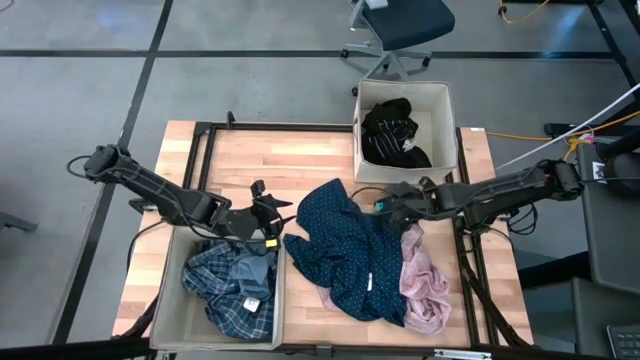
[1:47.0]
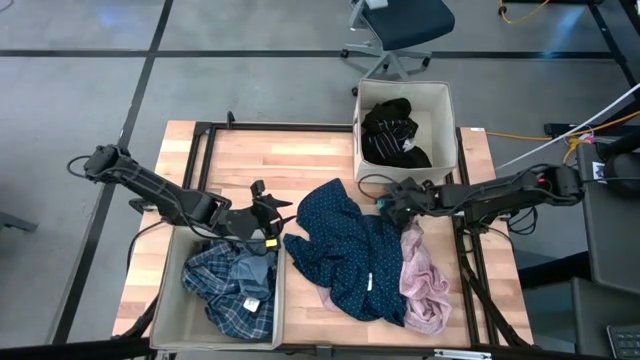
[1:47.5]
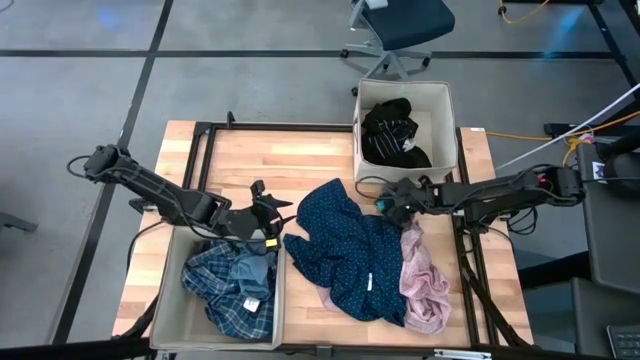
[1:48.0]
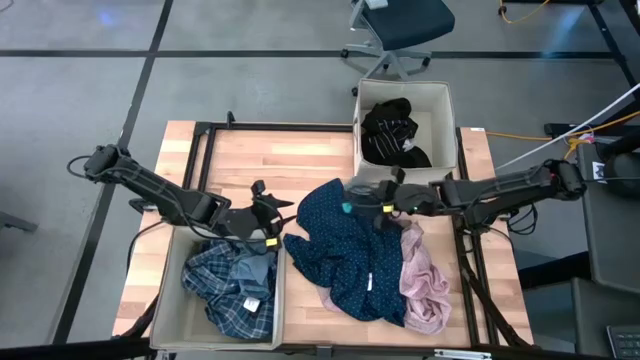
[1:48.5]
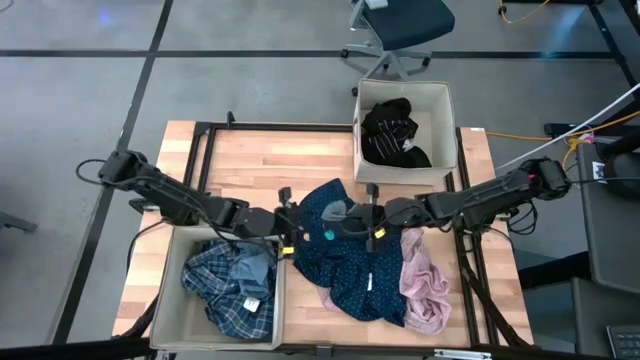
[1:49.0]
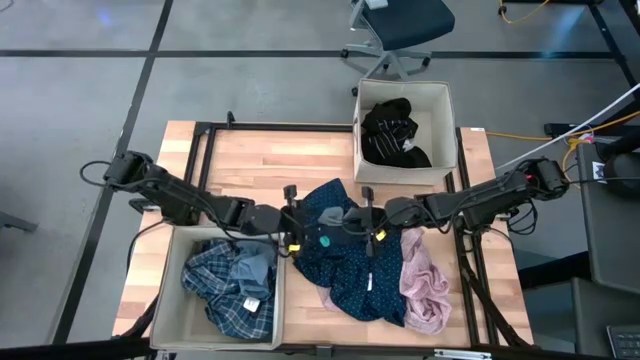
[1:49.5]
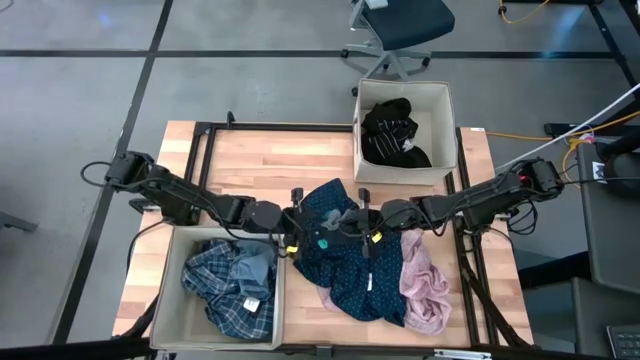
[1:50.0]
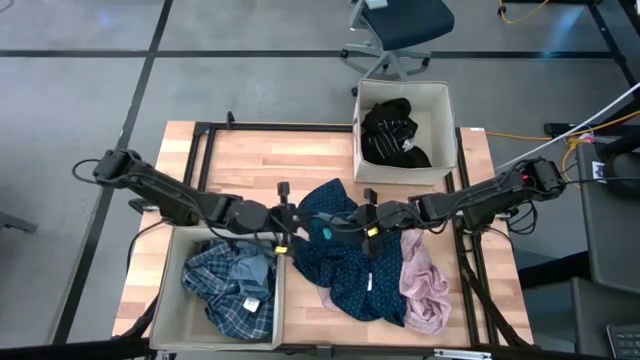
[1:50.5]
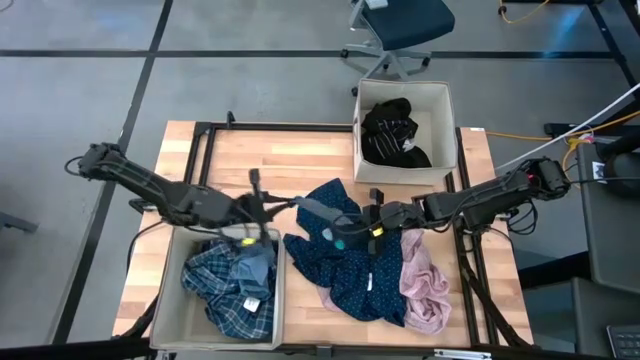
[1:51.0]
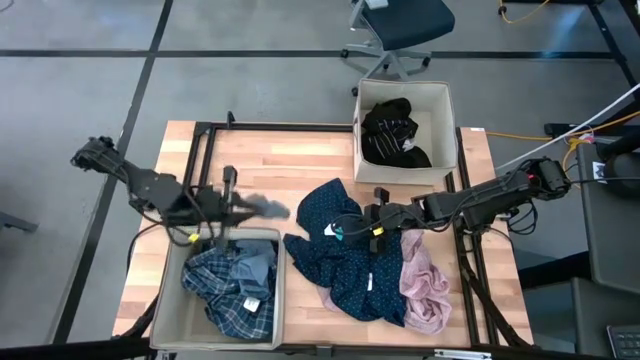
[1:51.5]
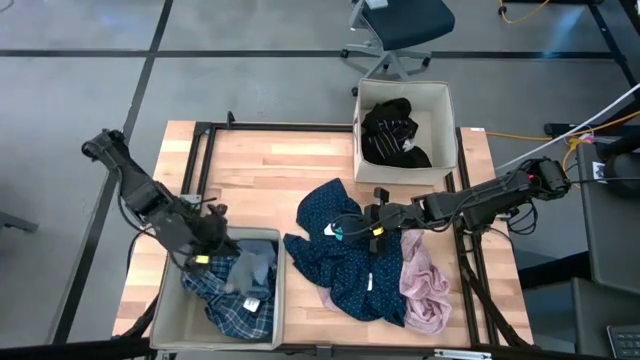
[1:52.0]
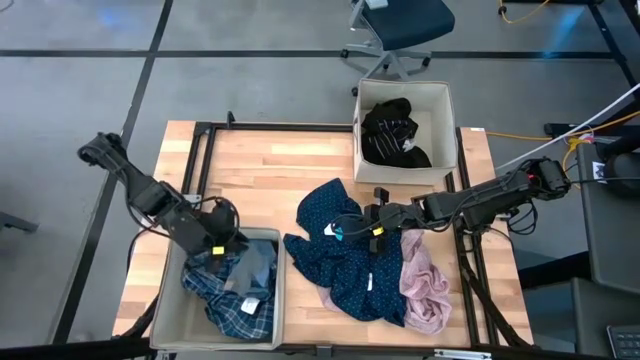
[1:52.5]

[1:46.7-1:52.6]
Task: Sort clothes
Put the gray sock into the bottom laundry organizer

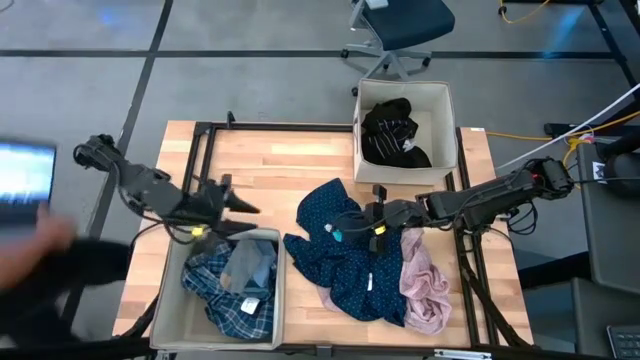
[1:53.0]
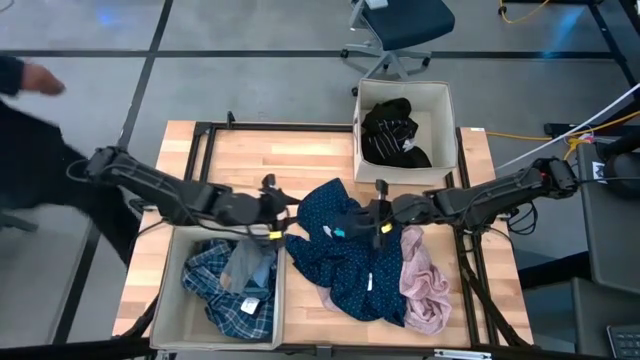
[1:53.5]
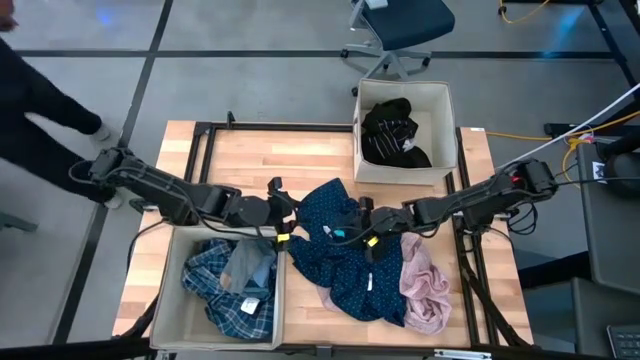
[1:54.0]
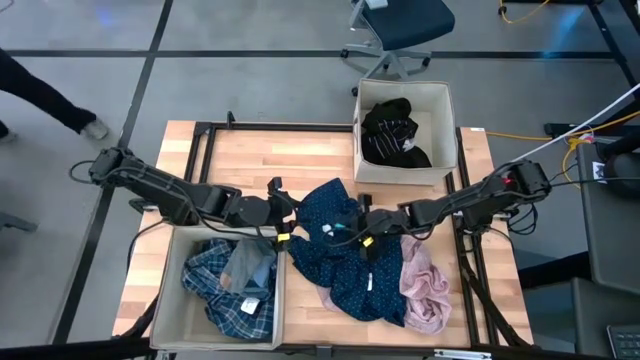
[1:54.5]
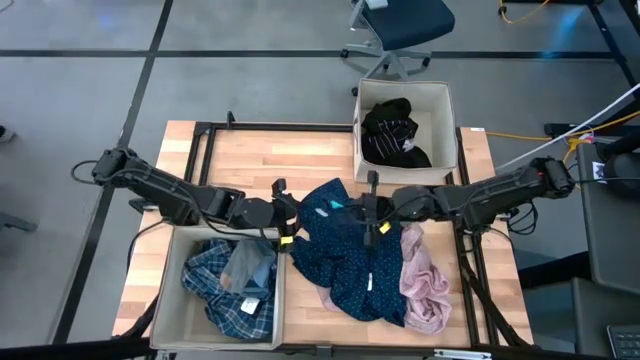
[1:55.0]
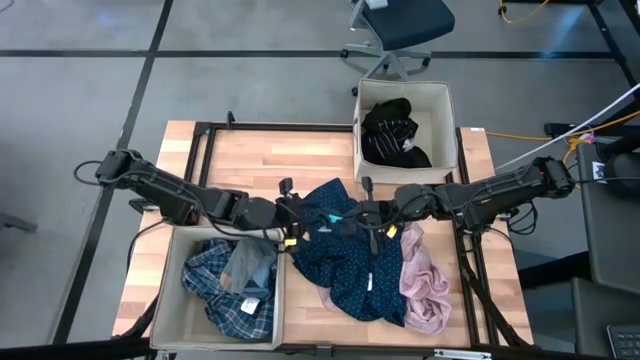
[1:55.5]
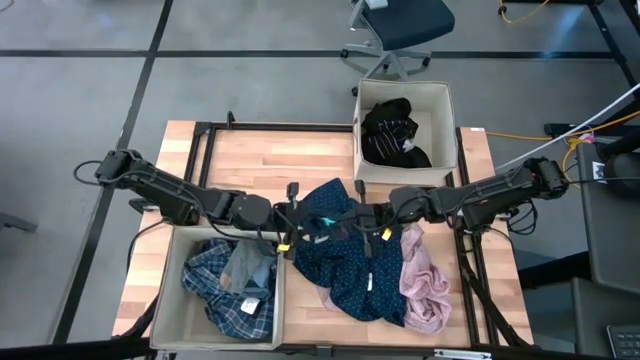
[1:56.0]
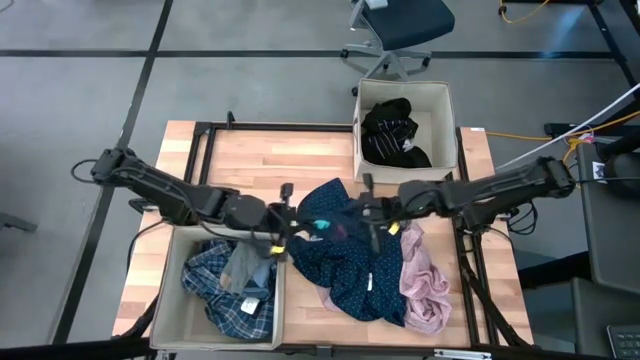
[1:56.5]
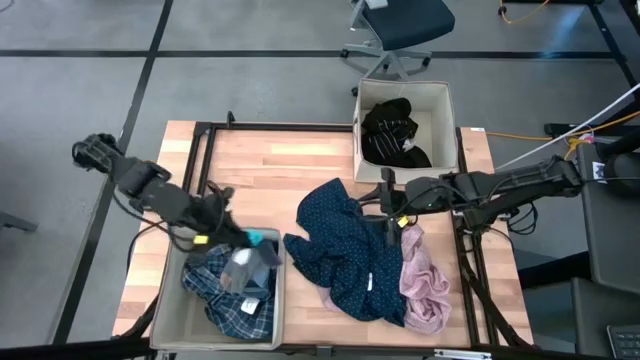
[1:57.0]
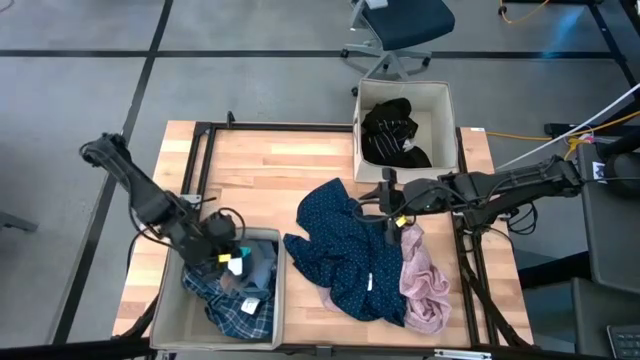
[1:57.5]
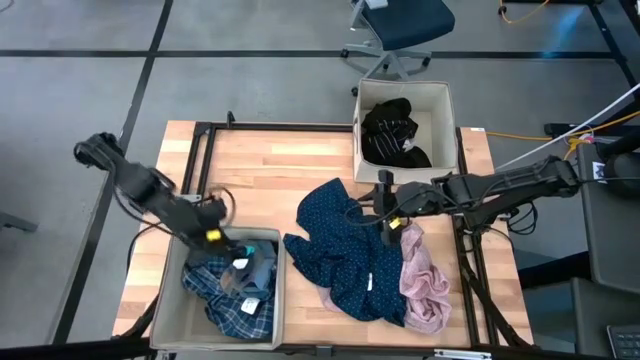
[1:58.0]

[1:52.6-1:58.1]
Put the blue sock into the bottom laundry organizer

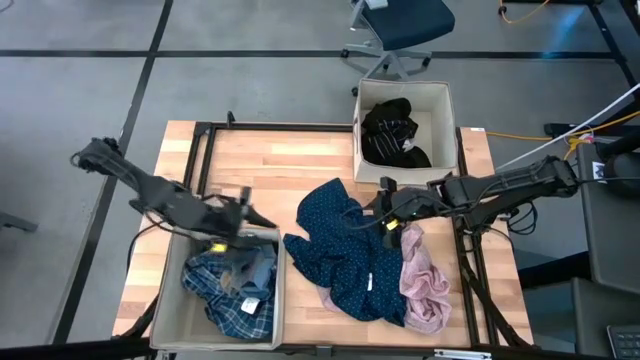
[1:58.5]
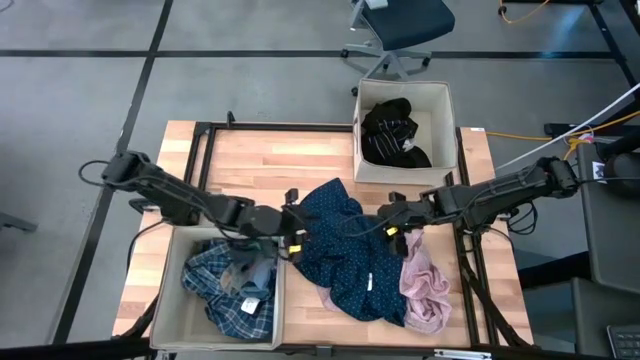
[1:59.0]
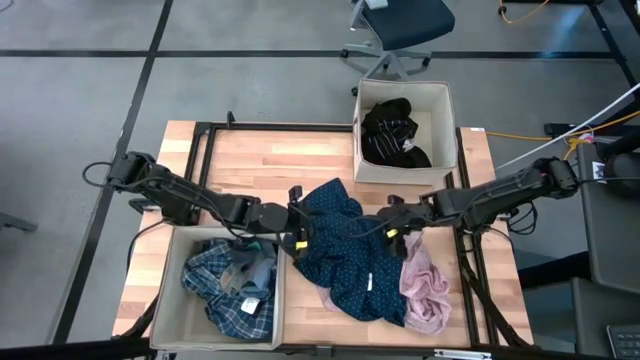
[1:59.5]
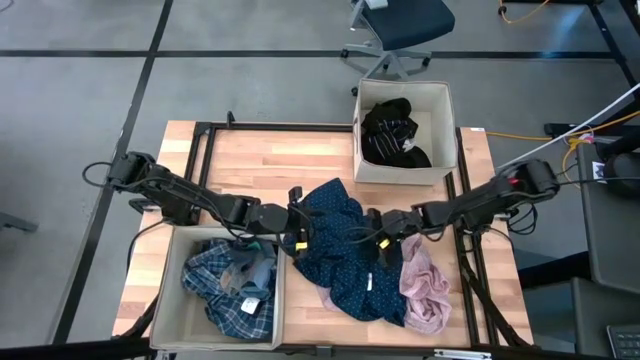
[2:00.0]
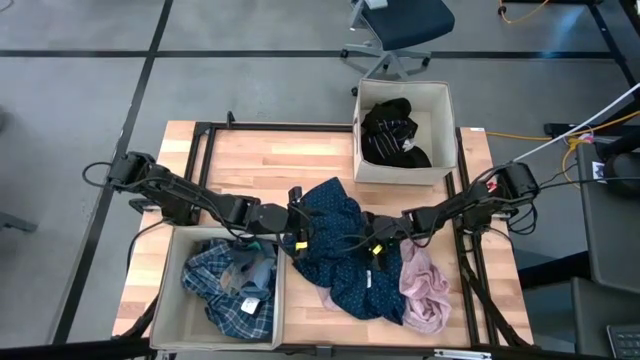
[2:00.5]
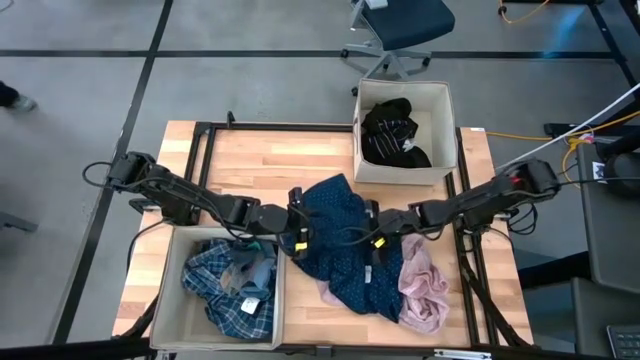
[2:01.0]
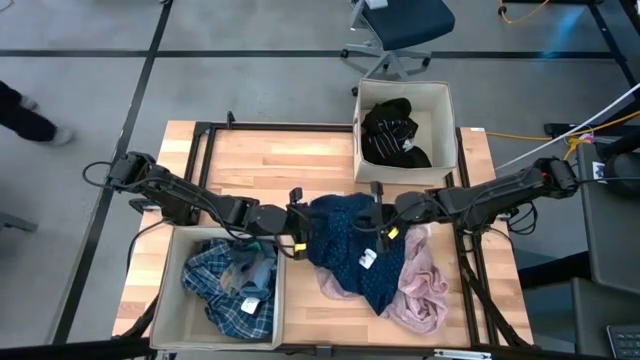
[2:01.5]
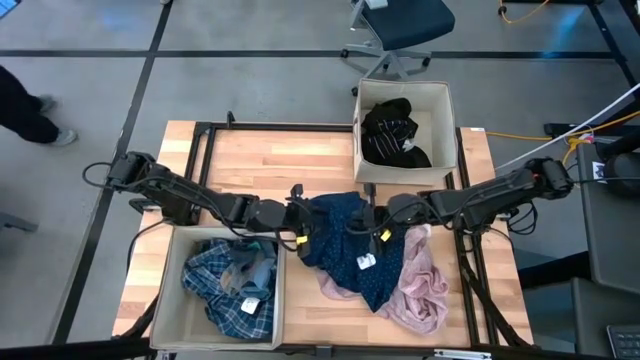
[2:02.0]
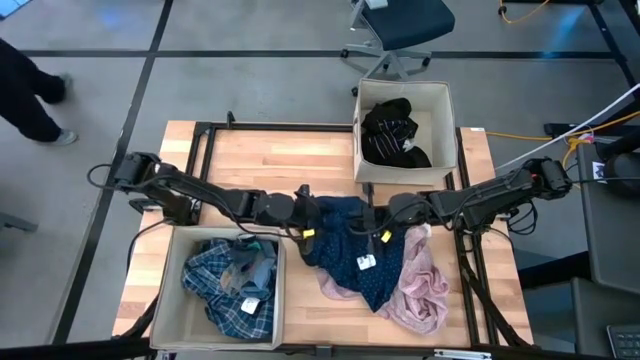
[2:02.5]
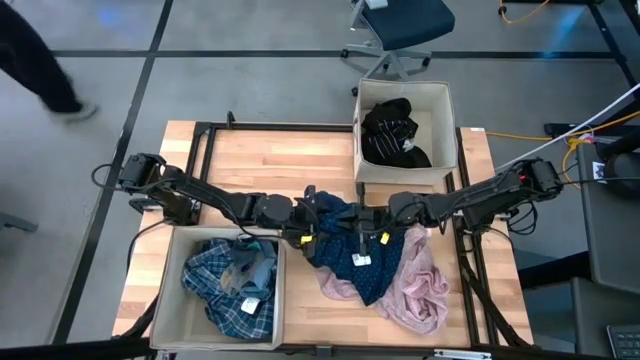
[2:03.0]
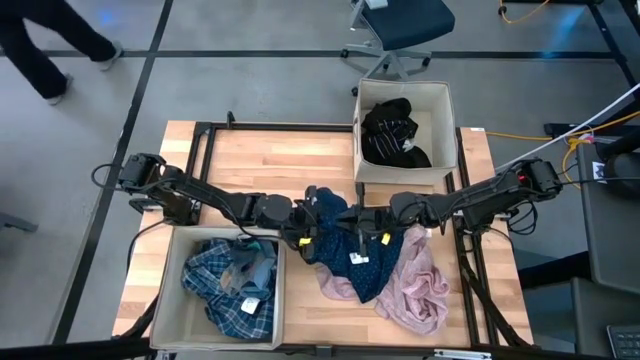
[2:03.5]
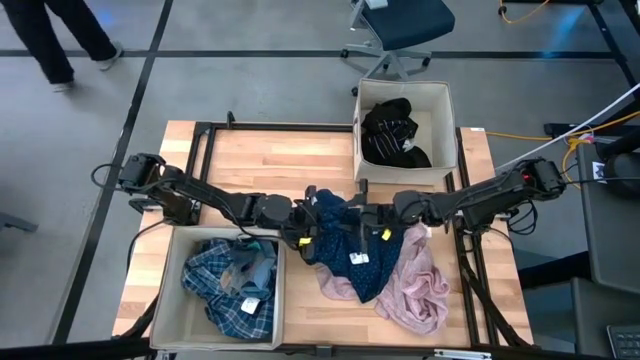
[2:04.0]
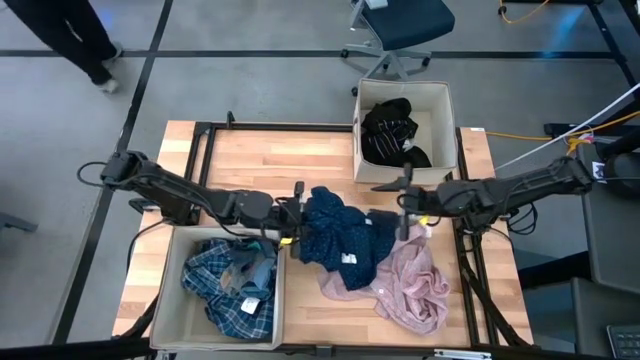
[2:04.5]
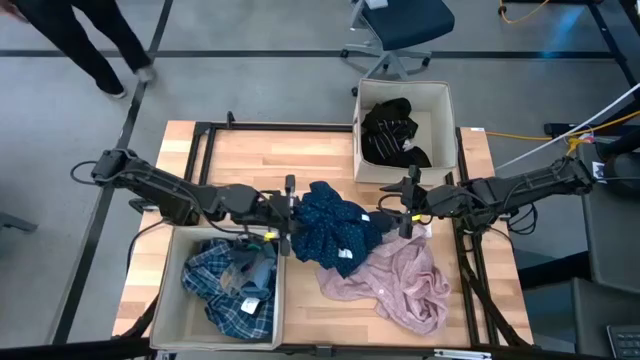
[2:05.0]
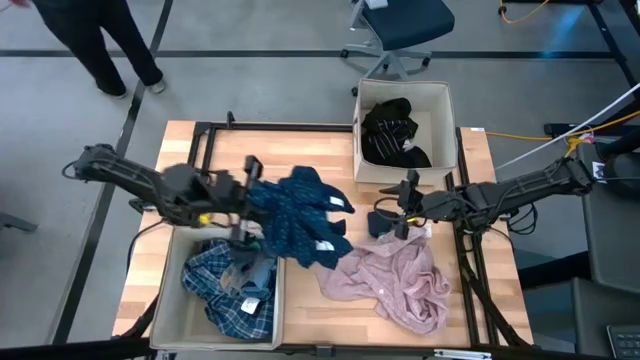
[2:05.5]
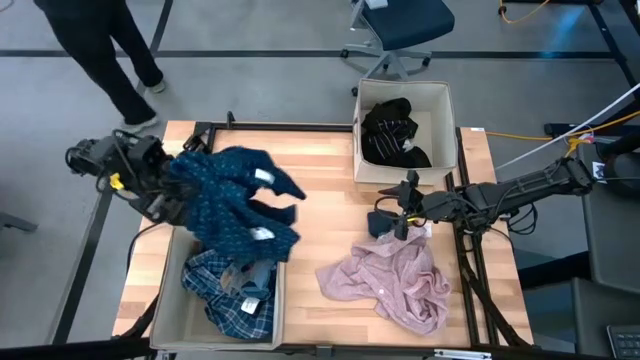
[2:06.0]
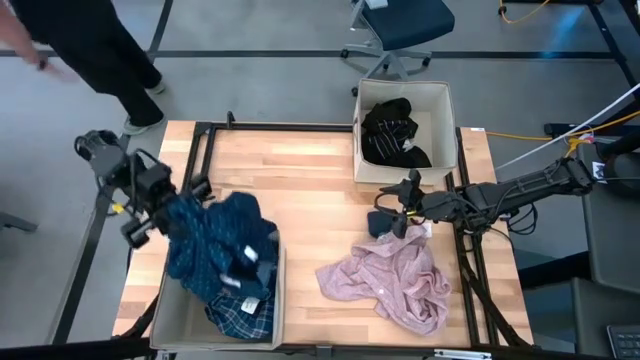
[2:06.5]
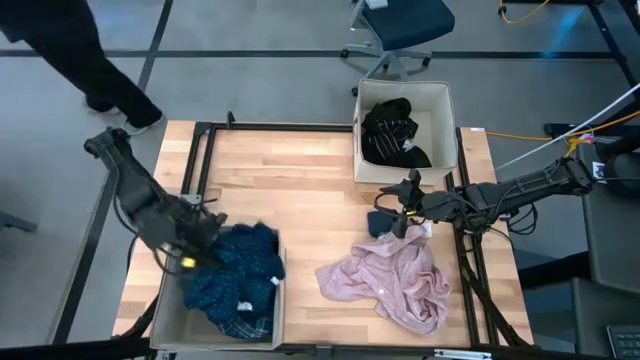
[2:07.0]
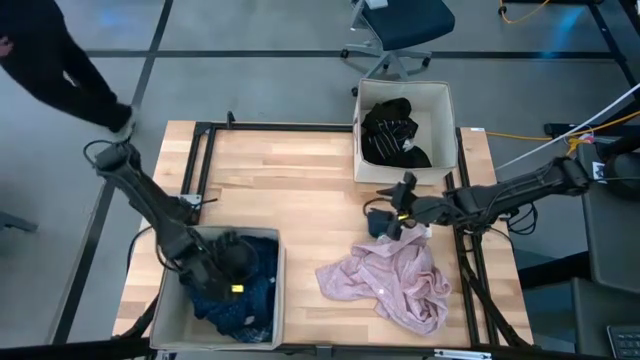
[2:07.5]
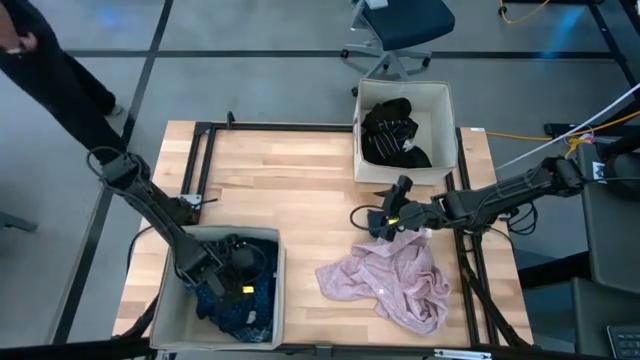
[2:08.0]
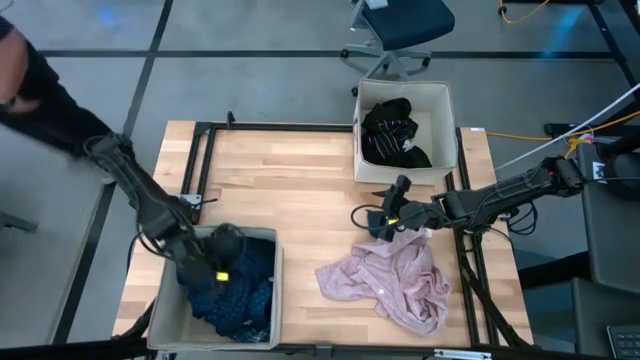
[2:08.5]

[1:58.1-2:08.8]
Put the blue sleeve into the bottom laundry organizer
